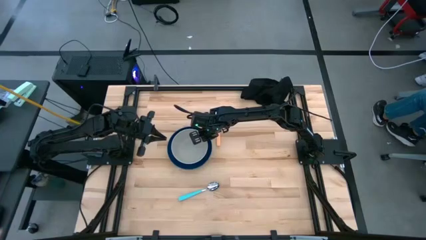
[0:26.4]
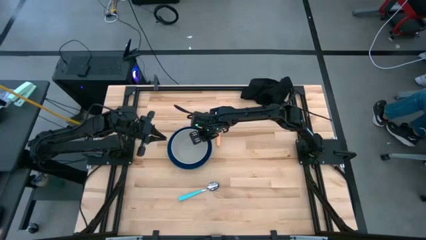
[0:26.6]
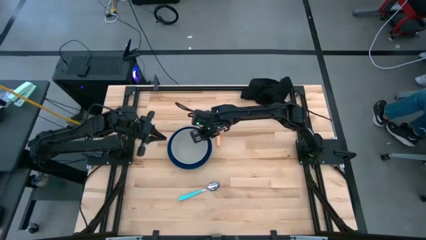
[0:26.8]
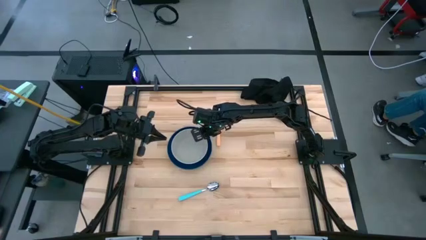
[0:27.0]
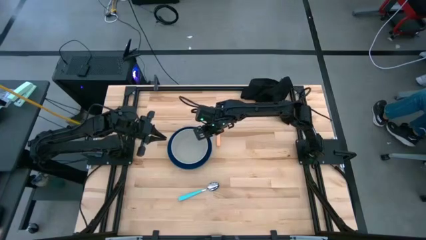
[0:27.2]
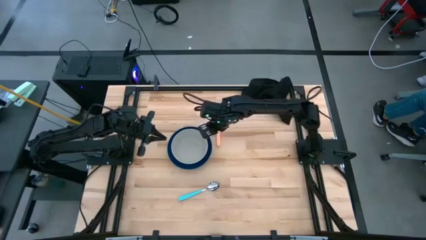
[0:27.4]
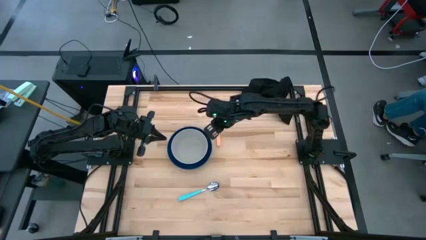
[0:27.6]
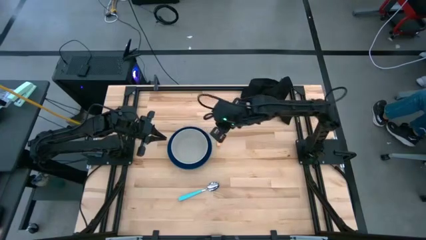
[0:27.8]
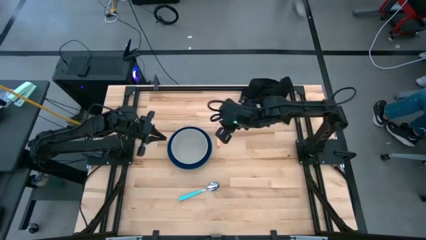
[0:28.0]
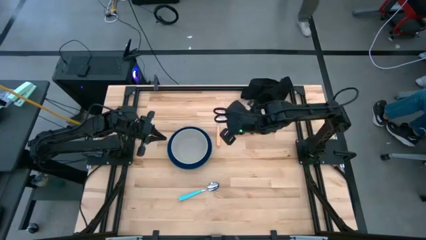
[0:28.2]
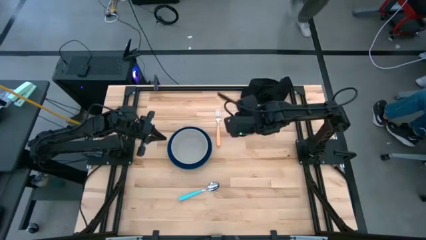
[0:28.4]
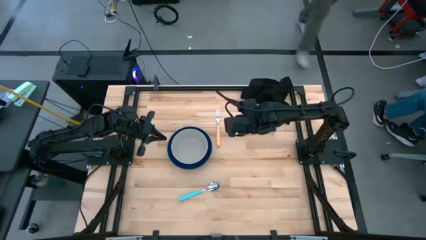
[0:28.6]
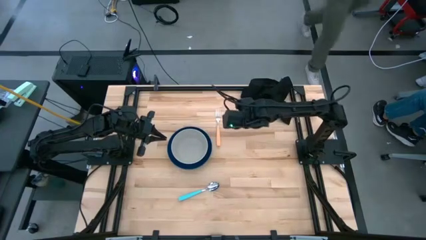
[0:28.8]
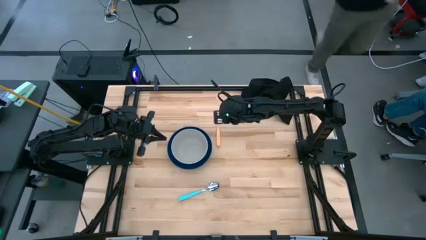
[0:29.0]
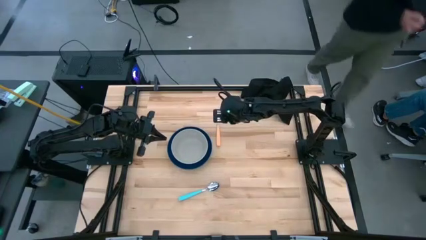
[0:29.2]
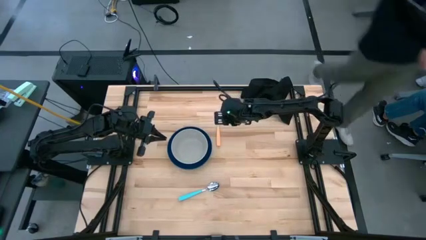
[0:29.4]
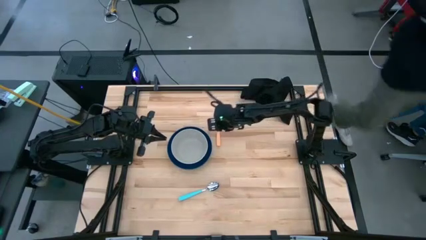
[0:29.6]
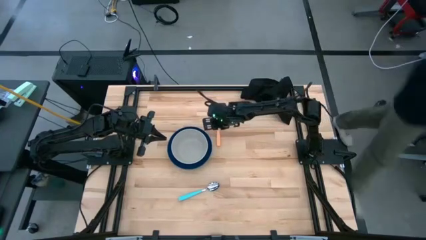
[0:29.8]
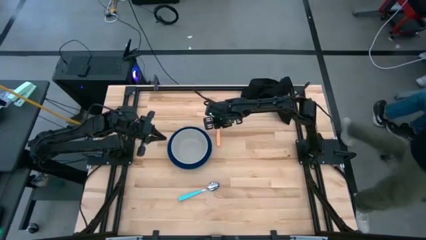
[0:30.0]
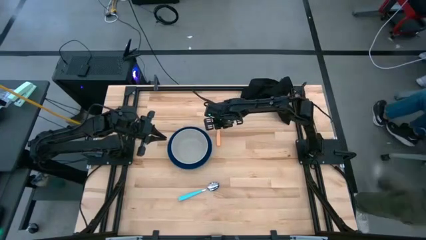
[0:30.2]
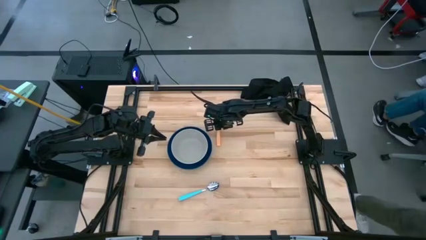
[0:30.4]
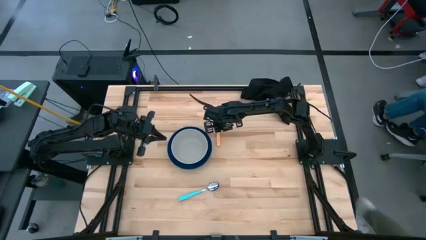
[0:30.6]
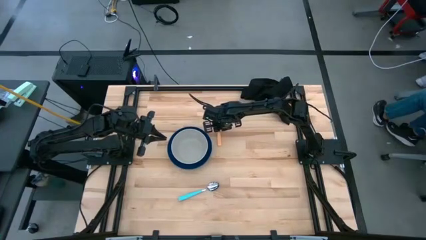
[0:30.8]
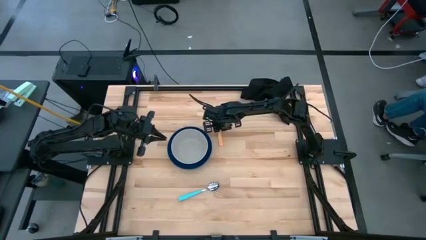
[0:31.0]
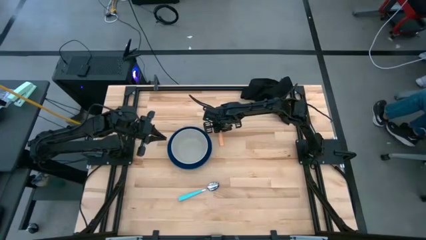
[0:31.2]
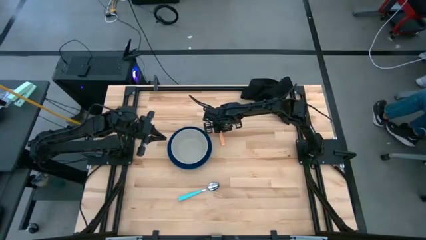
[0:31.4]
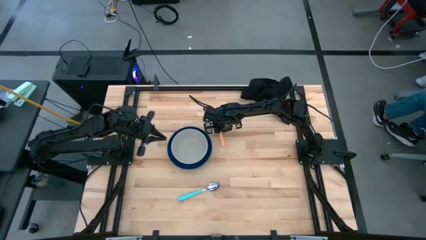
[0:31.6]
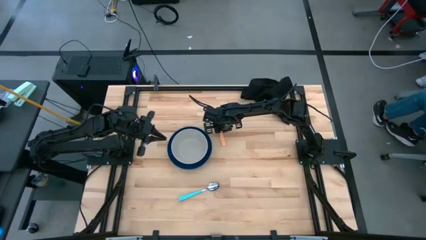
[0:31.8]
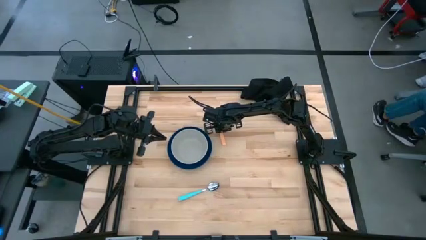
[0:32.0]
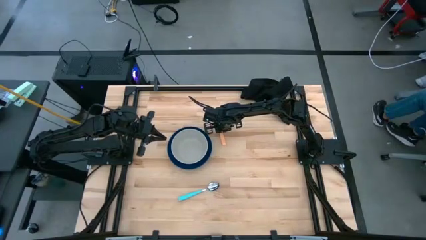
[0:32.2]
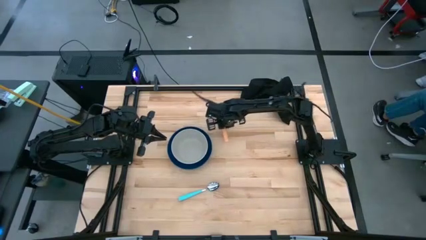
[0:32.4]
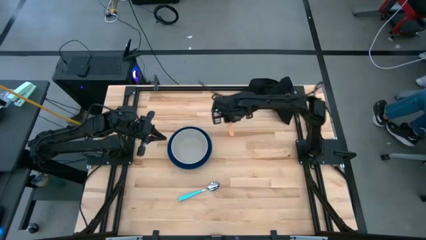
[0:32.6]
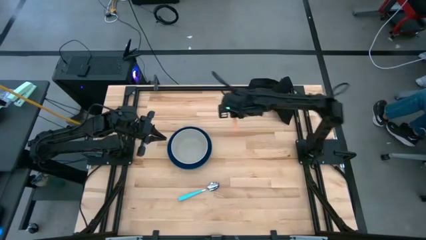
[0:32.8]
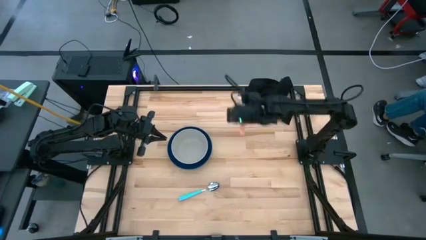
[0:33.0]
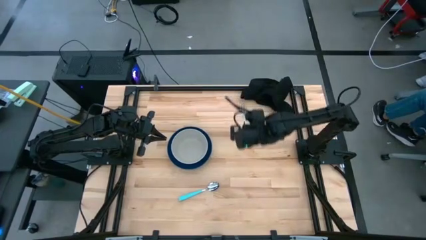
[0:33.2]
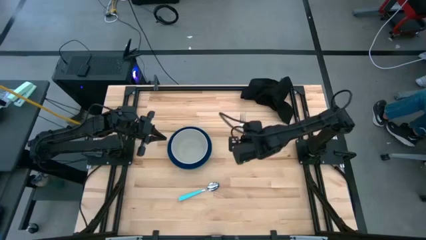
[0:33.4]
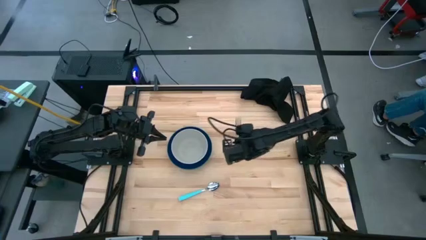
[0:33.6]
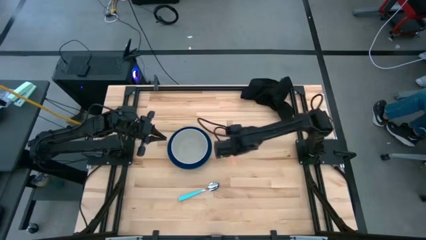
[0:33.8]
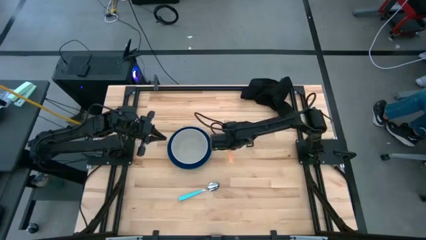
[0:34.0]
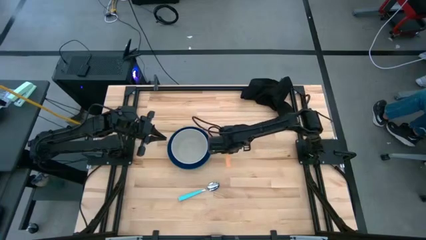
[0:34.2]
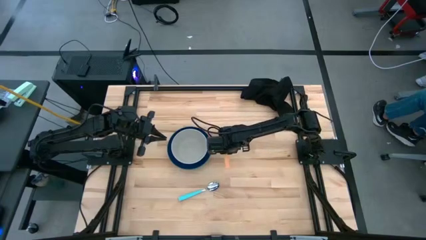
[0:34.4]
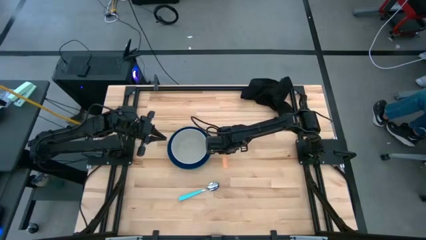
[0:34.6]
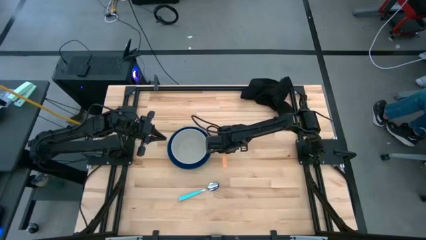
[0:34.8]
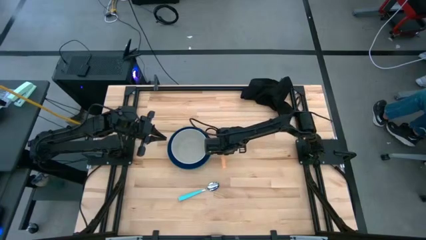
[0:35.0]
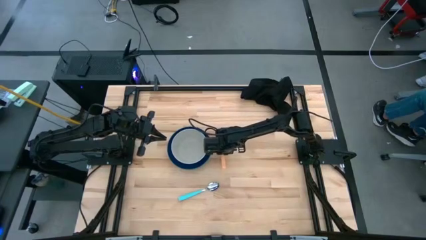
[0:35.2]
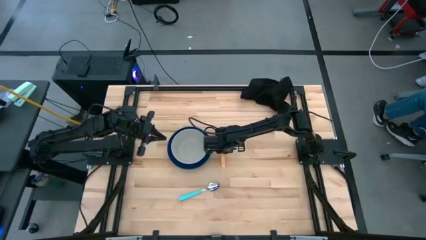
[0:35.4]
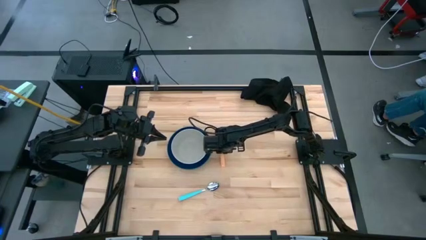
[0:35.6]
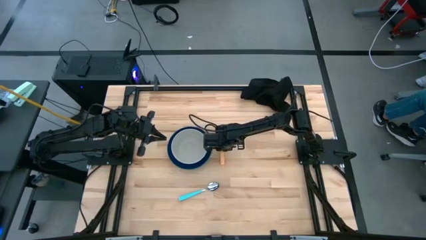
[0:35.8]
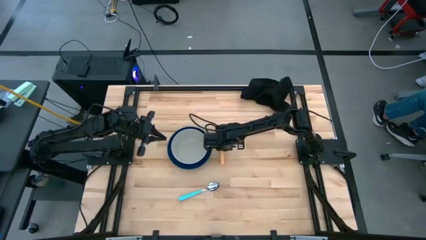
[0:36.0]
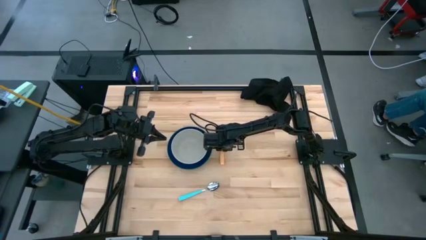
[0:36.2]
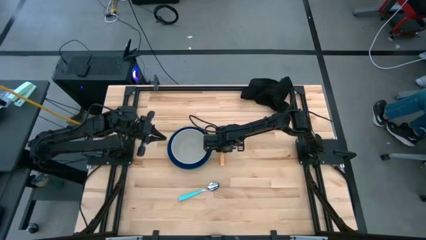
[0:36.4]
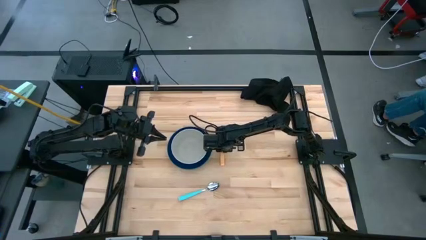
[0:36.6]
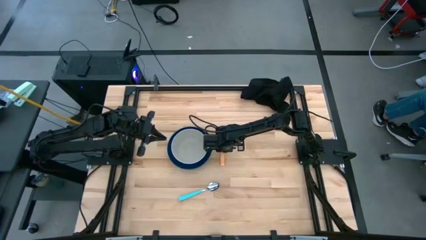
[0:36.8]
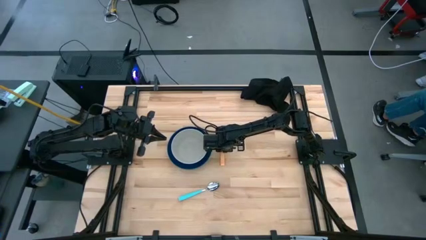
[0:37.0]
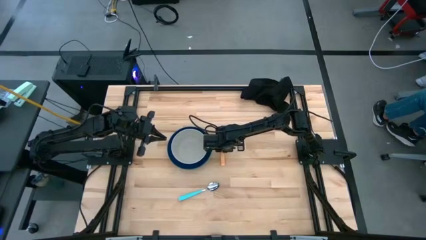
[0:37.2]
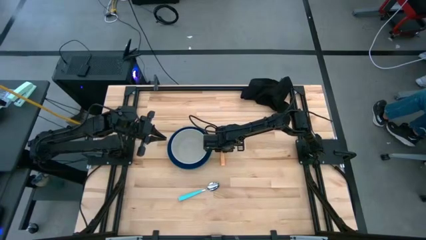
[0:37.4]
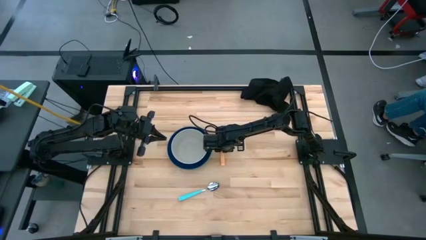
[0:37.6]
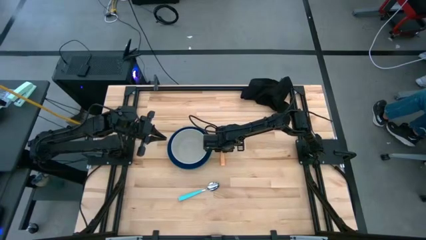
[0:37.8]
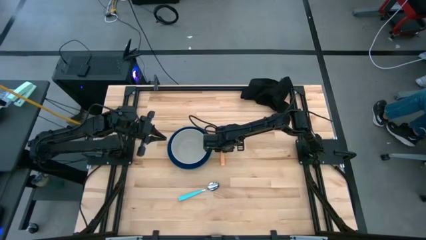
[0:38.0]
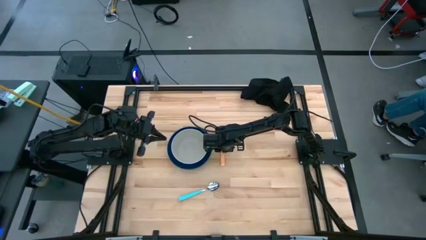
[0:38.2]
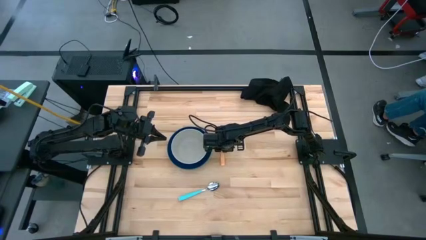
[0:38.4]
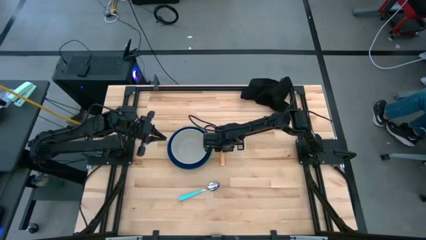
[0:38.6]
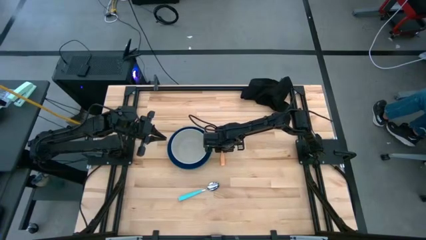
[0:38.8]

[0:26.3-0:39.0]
Task: Set table place
Put the orange fork on the table to the right of the blue bowl
